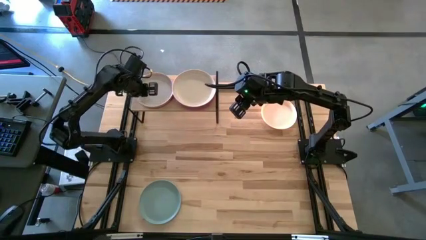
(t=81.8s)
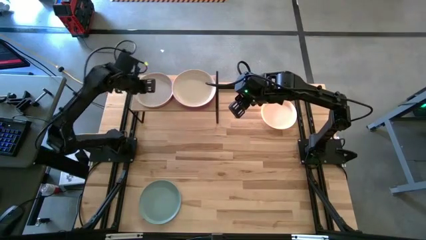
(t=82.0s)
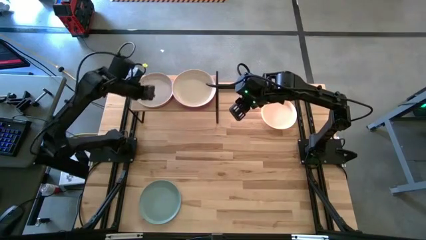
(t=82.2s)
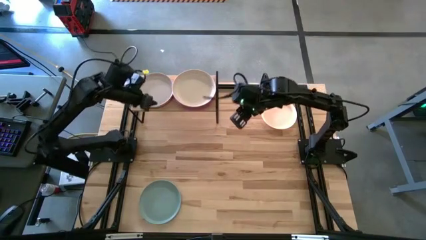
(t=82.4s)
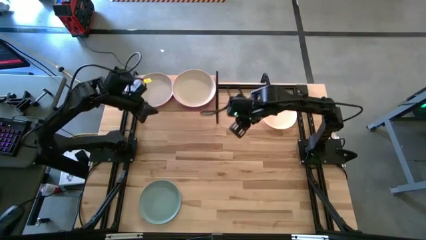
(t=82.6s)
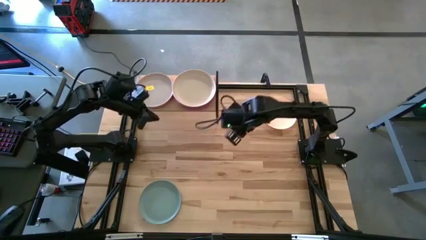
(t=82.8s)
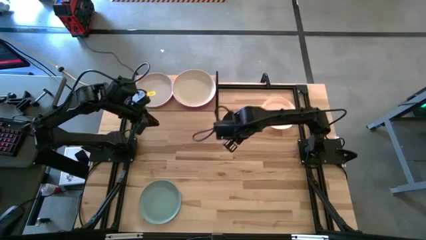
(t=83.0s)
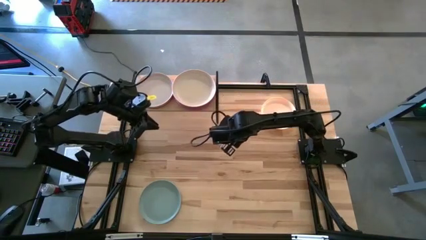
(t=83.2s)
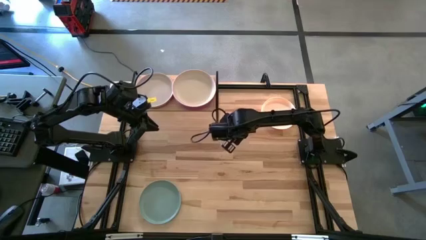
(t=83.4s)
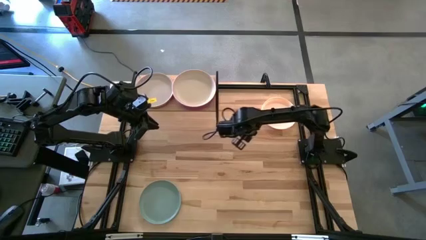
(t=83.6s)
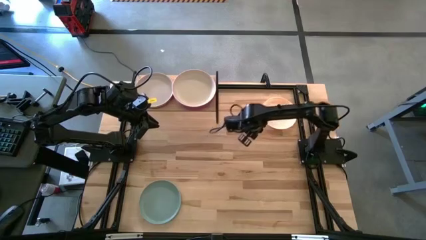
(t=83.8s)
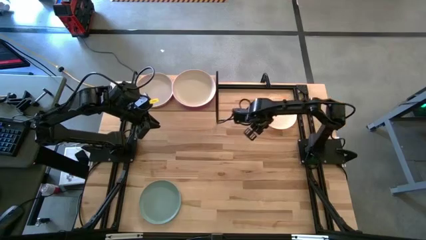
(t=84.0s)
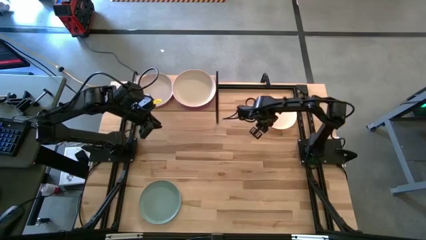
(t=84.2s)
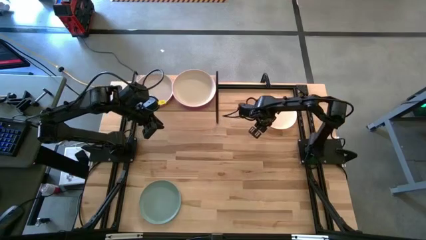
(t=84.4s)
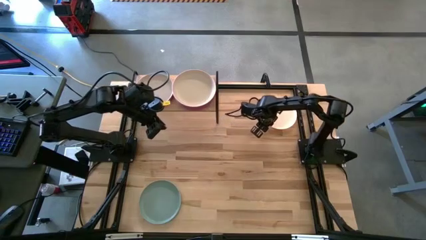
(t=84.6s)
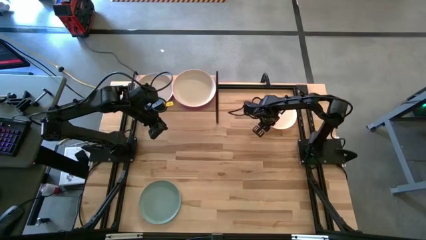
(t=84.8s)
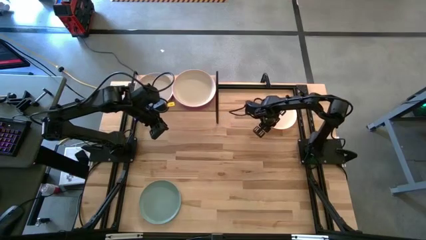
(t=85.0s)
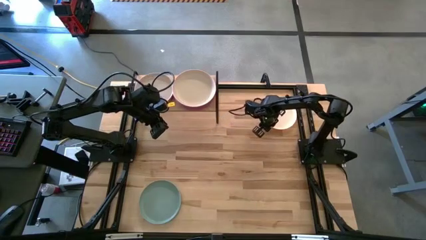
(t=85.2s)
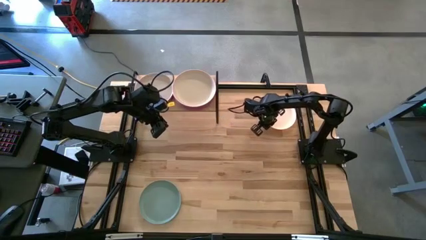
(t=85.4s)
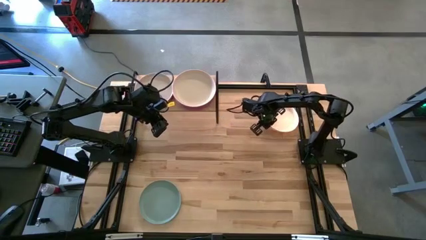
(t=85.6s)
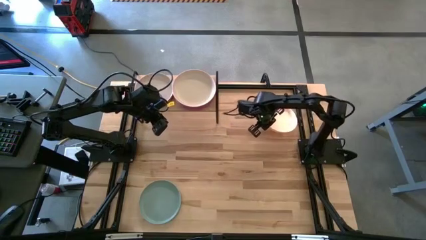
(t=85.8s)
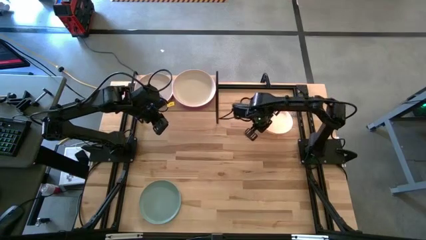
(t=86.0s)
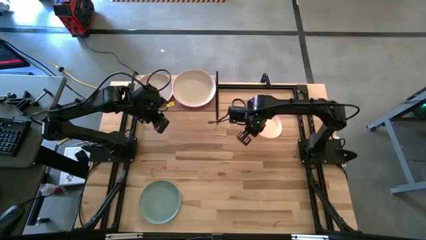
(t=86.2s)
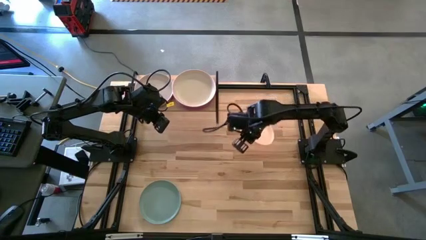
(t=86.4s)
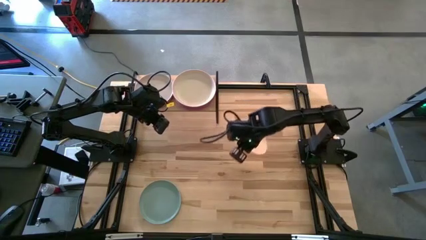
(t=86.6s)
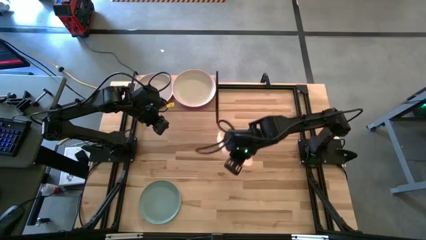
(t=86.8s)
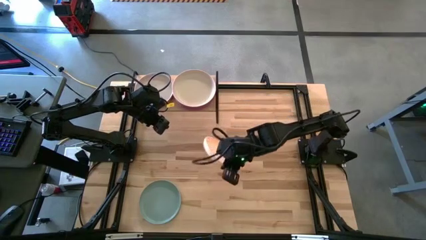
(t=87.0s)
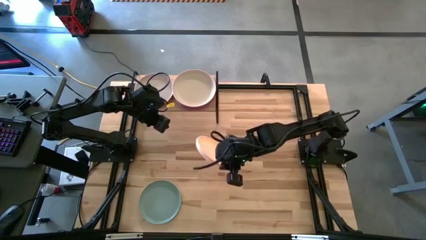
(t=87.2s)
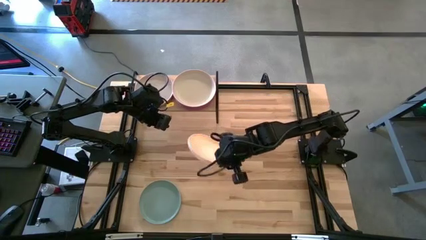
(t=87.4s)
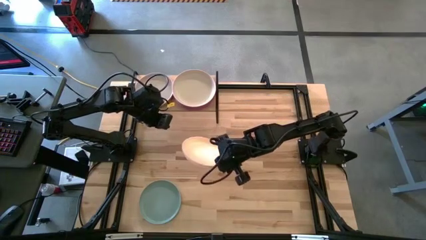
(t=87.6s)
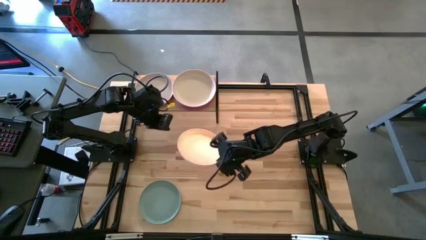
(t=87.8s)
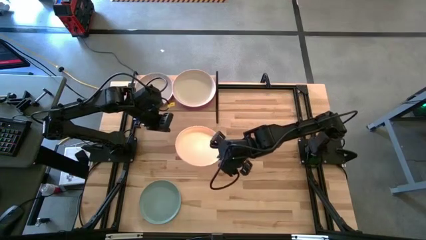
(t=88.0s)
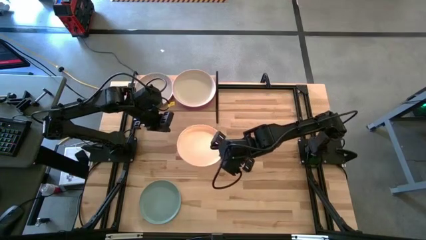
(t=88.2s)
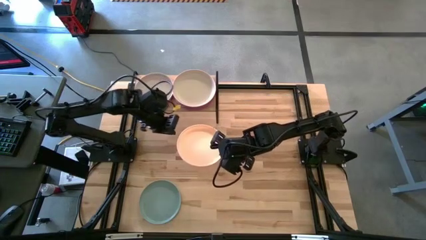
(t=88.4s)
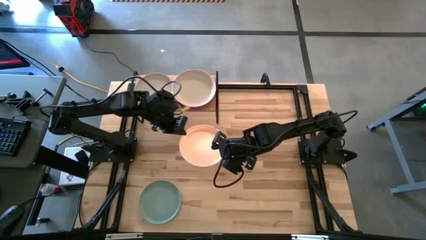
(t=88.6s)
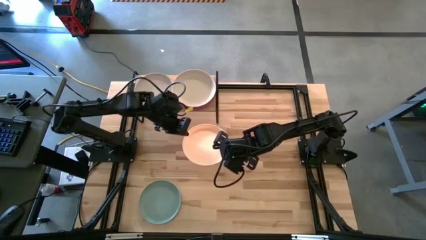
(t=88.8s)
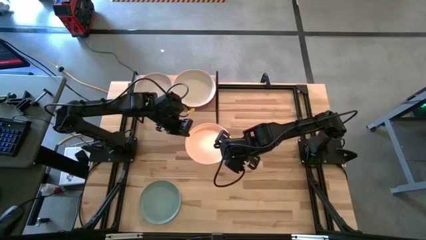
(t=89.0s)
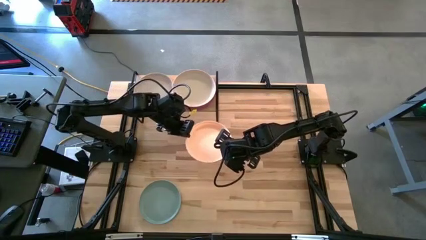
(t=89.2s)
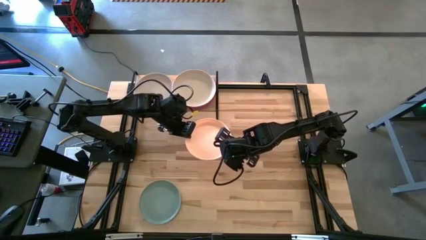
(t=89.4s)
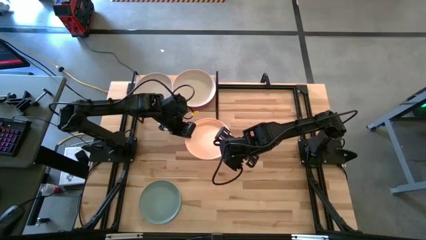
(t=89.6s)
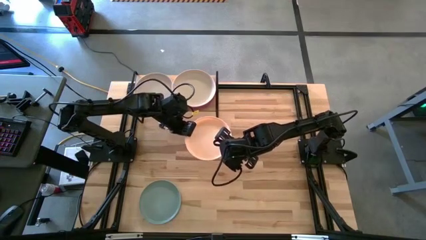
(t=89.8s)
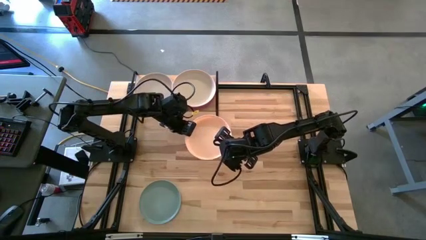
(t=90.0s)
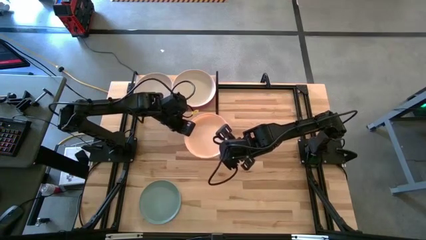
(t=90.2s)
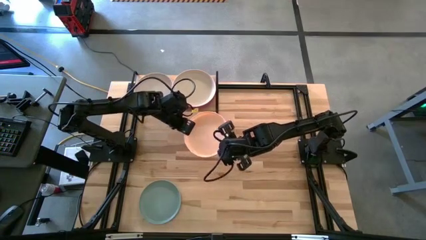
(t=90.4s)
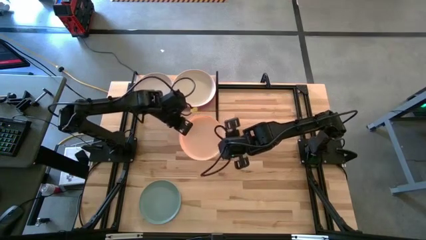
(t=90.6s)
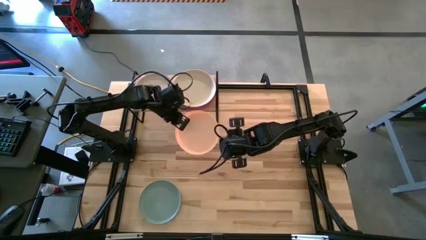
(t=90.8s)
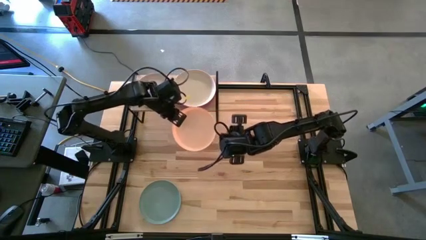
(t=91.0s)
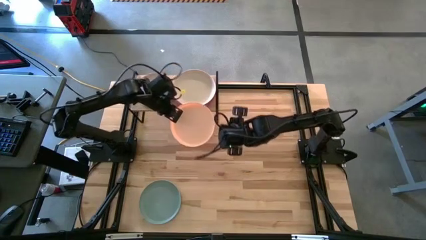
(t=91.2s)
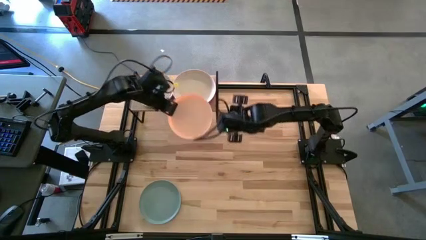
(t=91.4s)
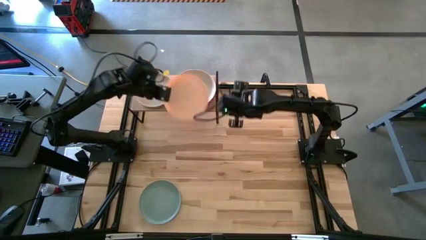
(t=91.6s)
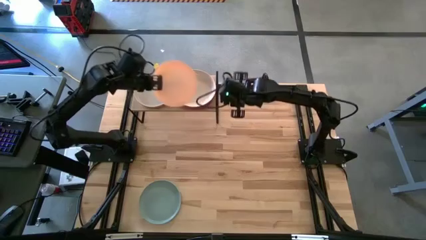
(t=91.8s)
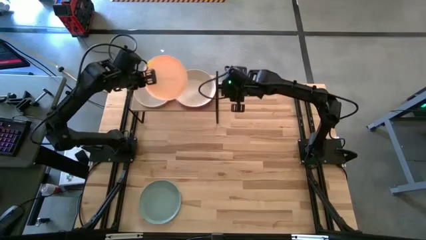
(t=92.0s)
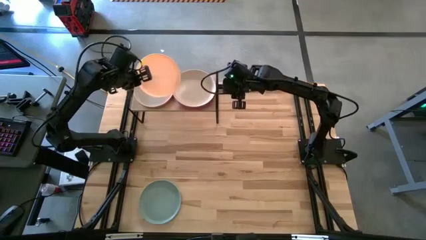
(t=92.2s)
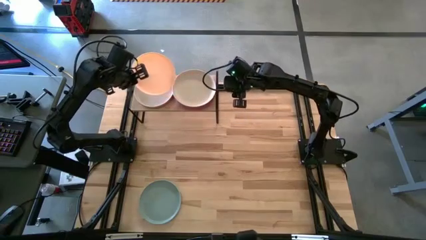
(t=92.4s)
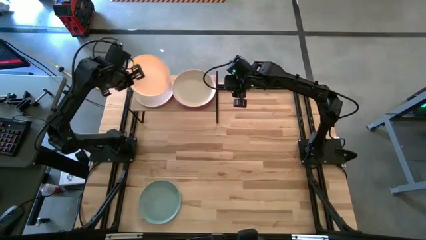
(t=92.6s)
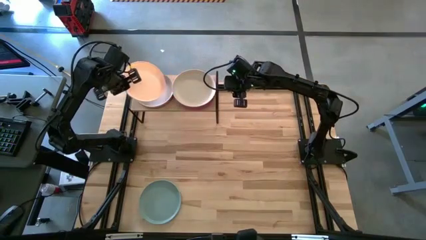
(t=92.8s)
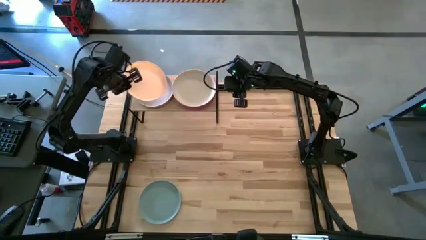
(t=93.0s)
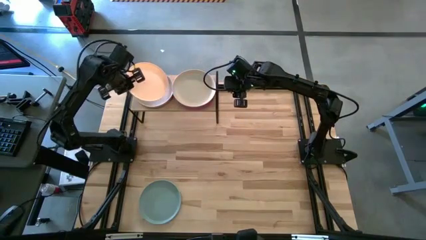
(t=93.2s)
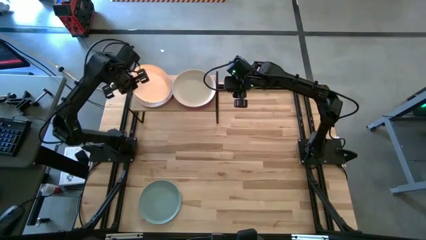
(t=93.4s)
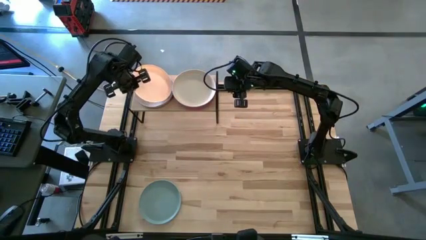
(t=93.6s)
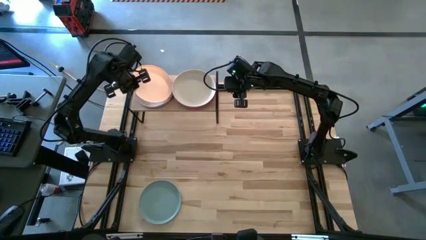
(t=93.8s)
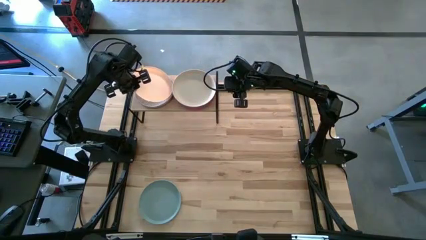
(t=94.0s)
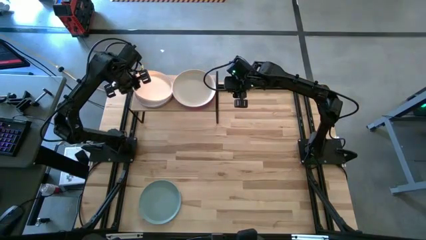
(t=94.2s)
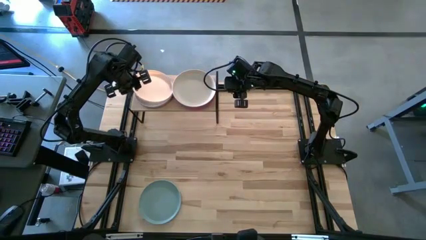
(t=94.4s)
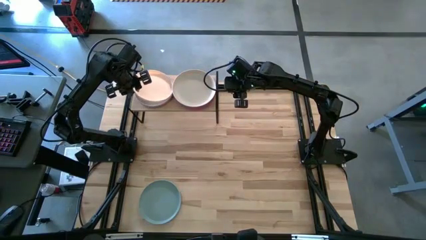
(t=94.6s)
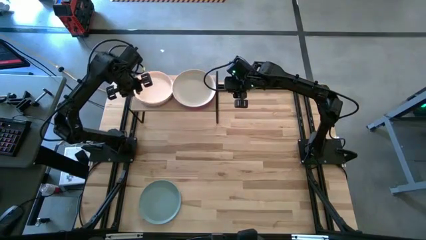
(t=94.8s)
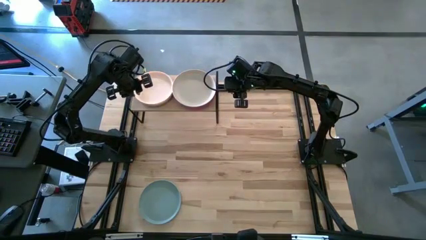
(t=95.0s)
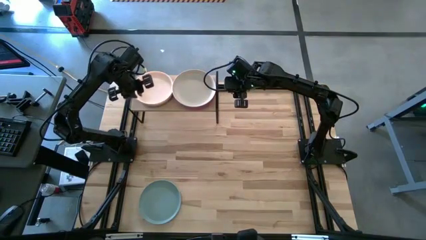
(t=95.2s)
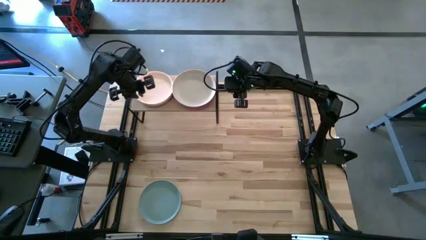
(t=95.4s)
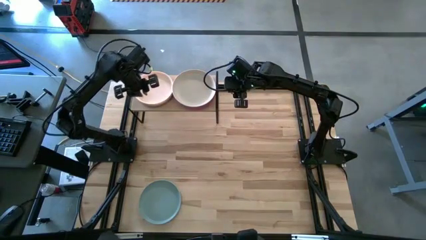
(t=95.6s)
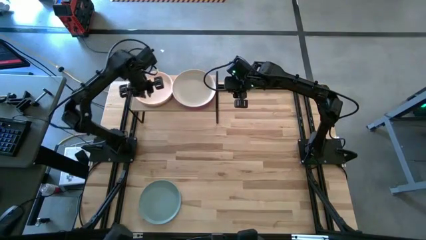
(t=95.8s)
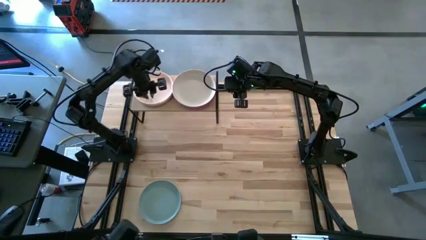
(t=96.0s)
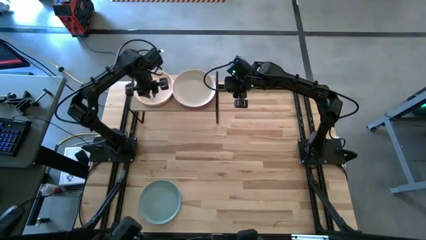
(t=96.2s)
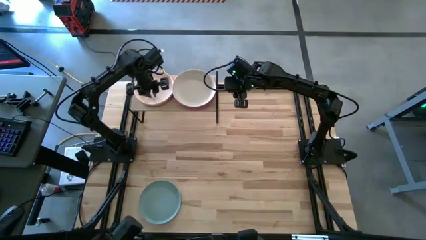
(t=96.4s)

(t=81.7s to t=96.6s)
Task: Place and stack plates onto a shelf
Stack the white plate on the top of the white plate
